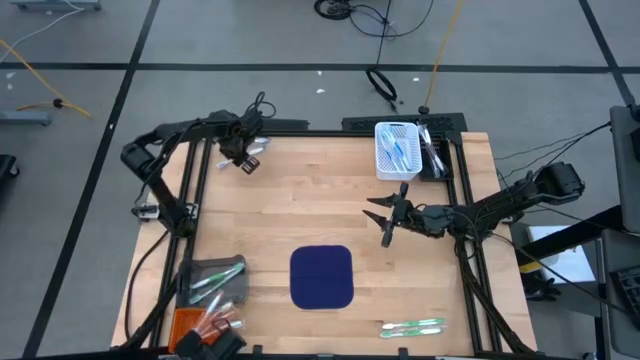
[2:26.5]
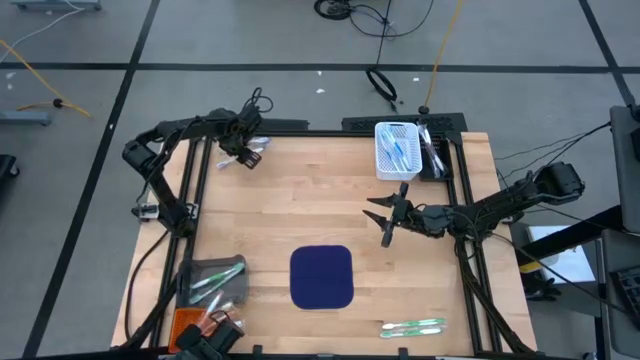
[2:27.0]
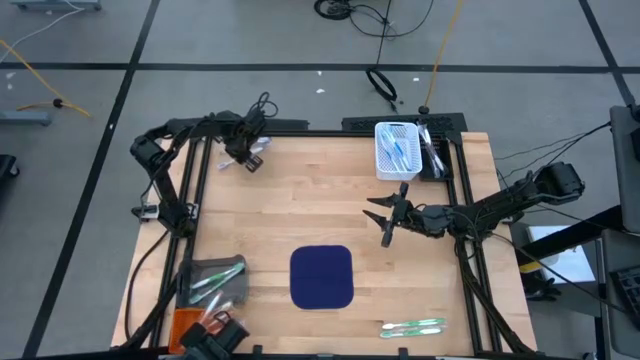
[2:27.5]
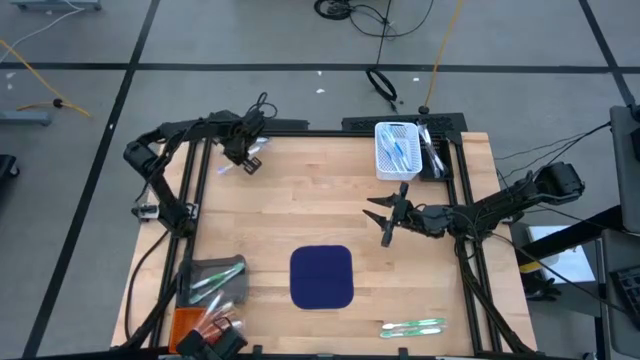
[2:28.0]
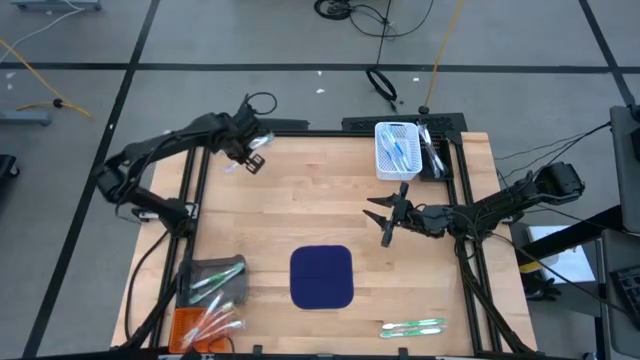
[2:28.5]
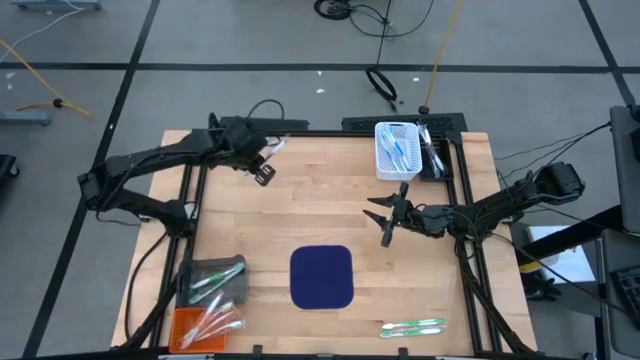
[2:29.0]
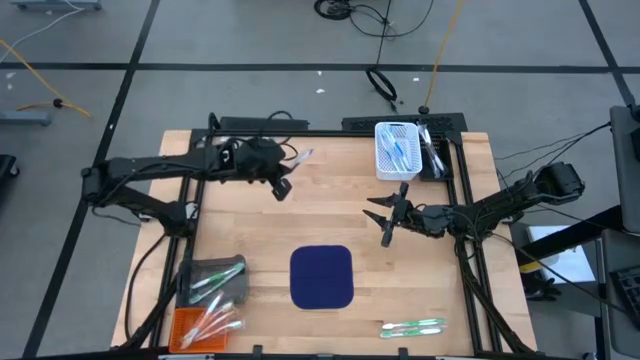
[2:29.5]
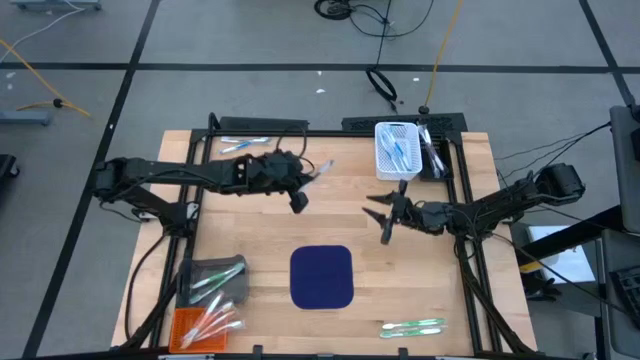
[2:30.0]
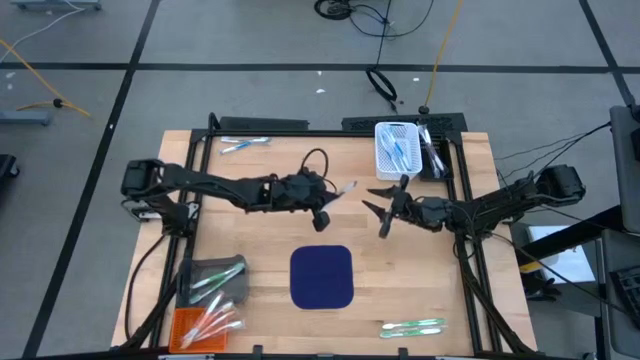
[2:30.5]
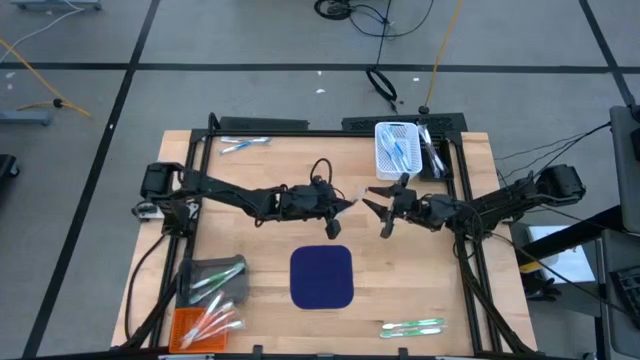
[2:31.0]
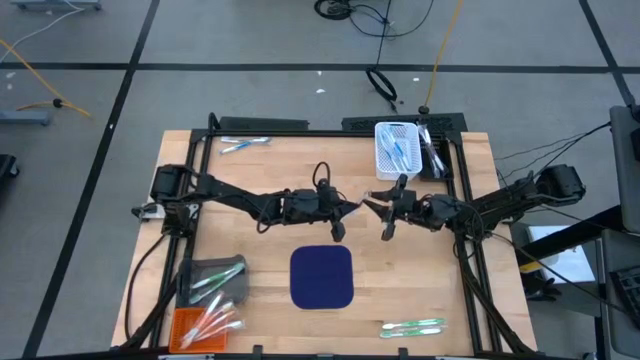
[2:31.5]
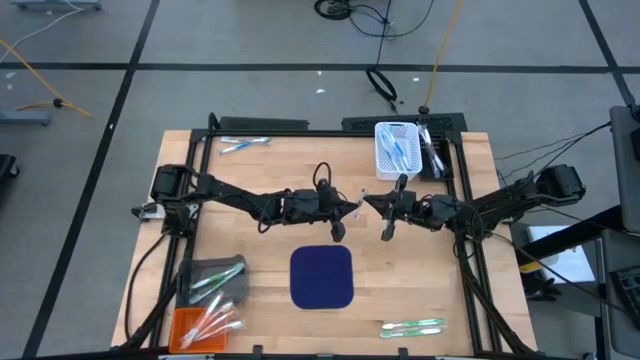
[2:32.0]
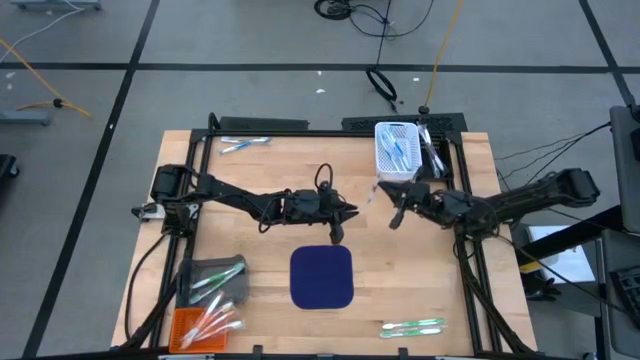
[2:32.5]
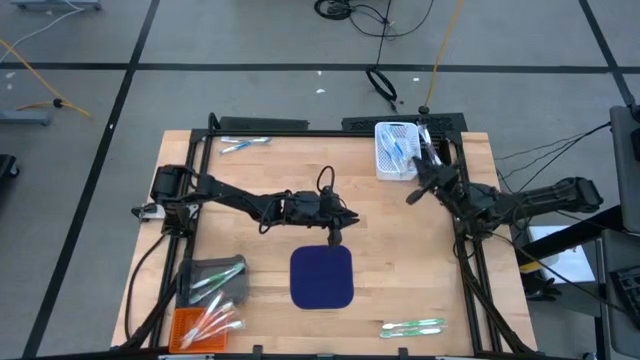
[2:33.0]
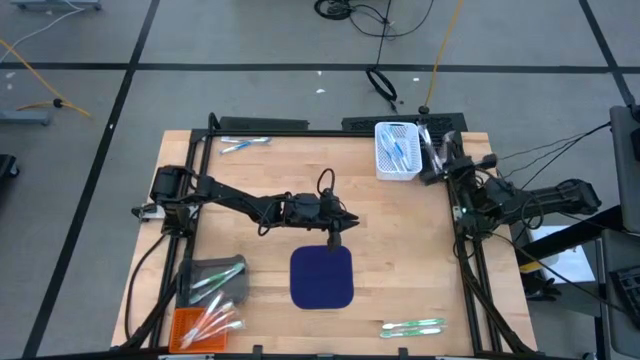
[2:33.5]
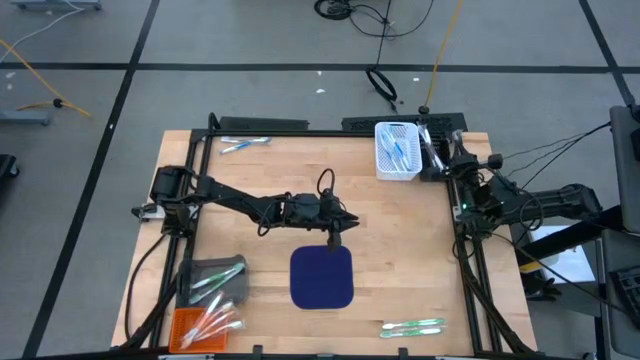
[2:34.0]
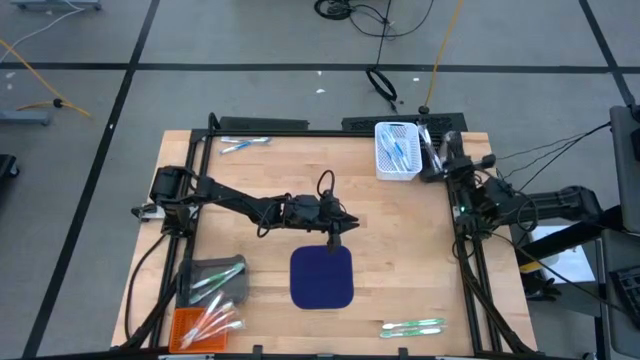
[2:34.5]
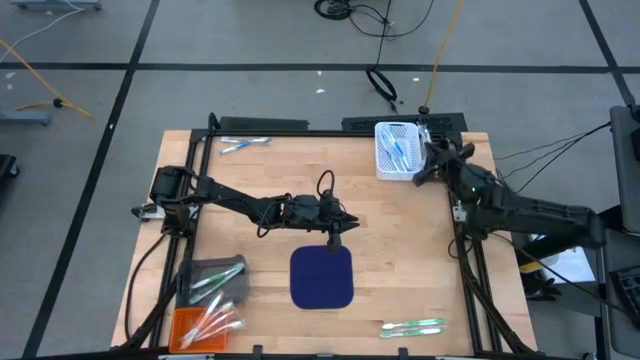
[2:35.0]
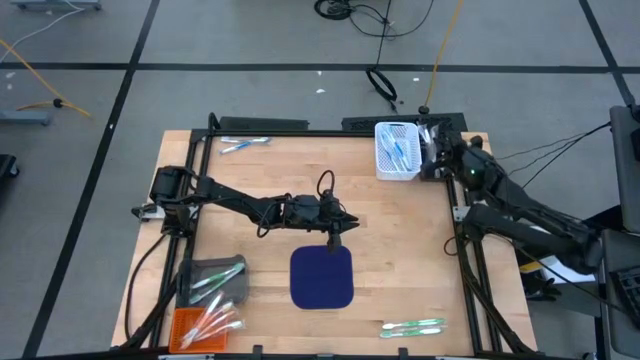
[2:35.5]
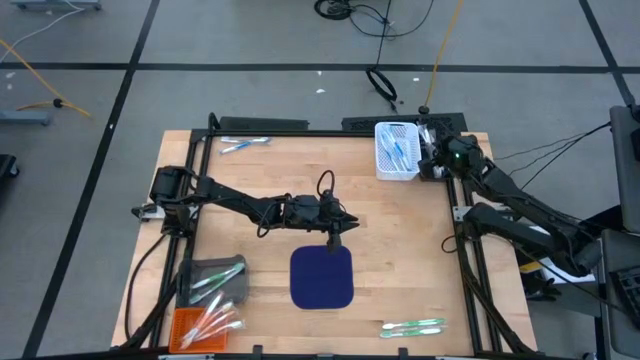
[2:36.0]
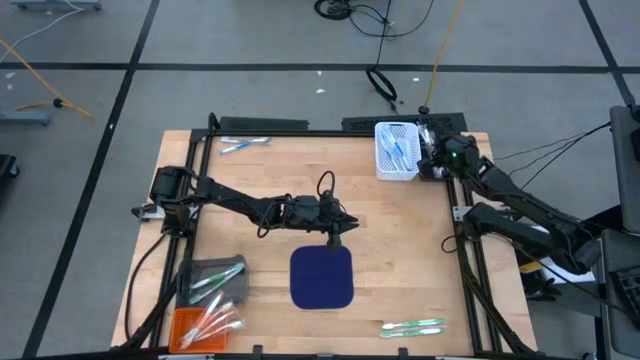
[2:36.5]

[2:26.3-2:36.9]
Task: Pick & Place Toothbrushes
Put the violet toothbrush into the black basket

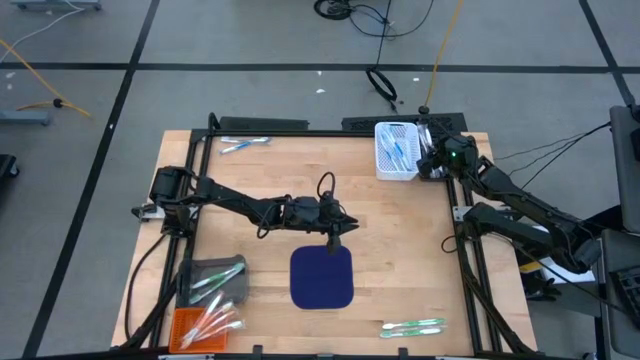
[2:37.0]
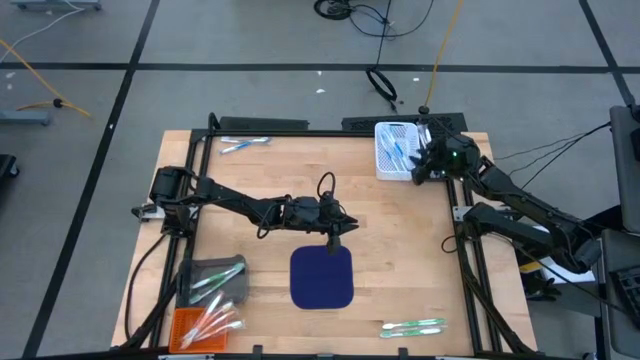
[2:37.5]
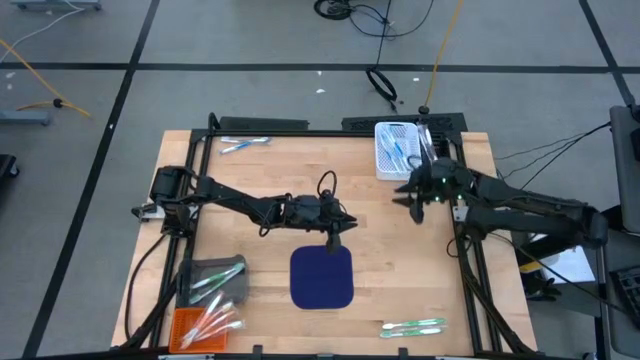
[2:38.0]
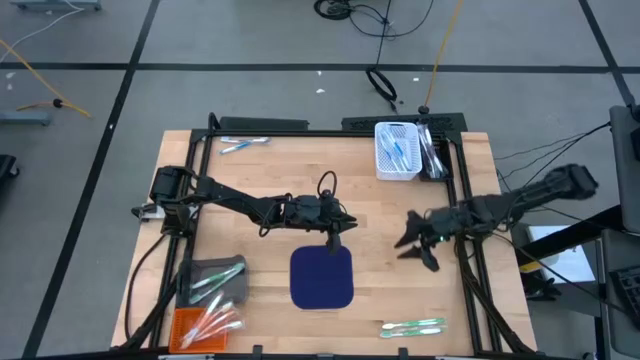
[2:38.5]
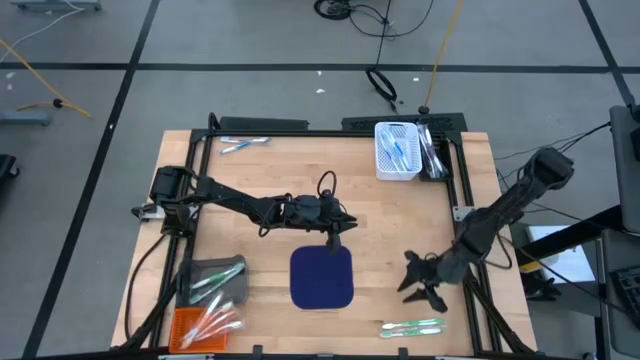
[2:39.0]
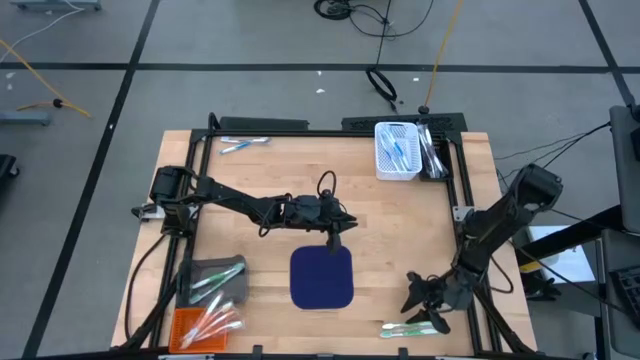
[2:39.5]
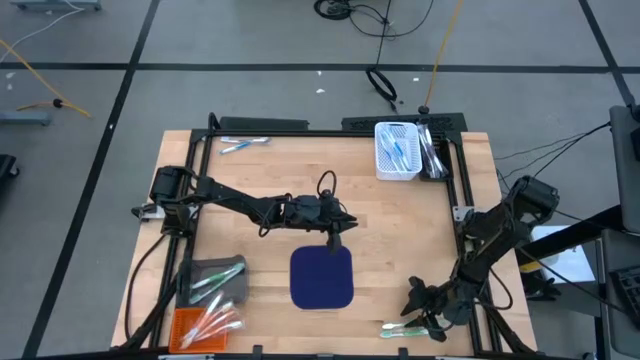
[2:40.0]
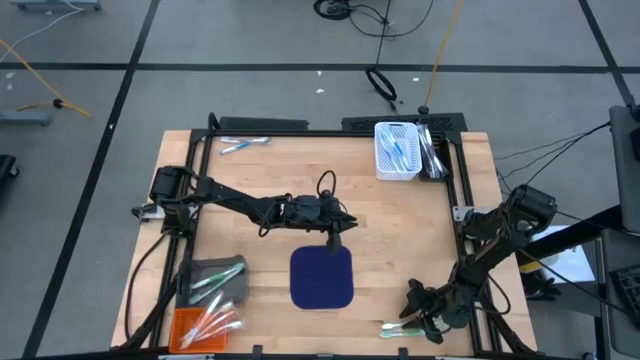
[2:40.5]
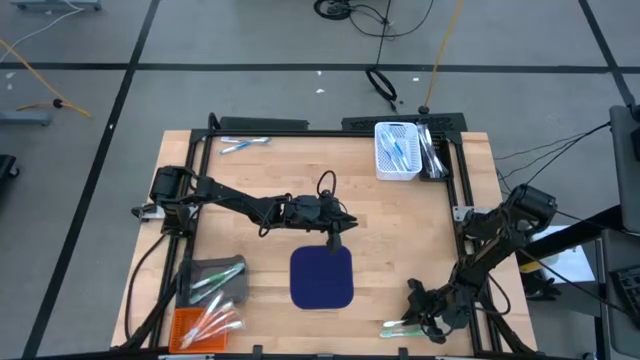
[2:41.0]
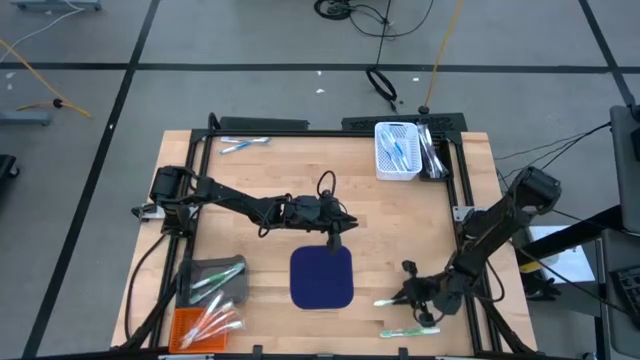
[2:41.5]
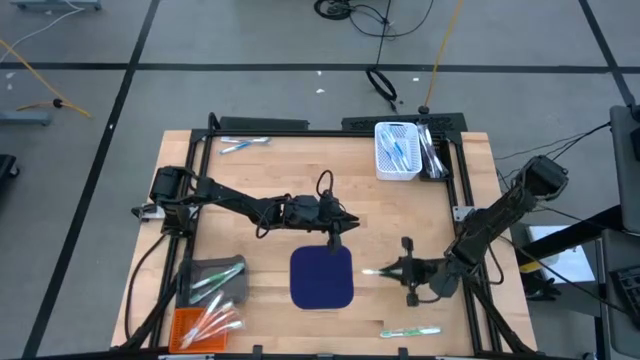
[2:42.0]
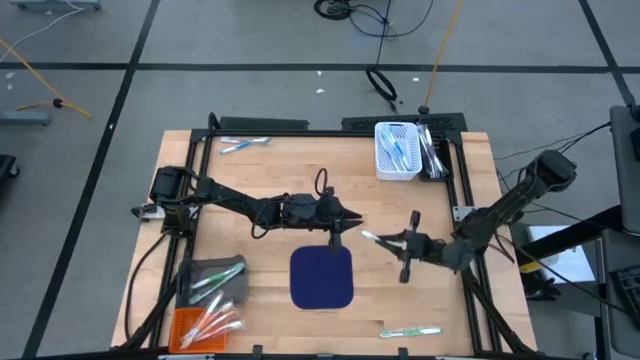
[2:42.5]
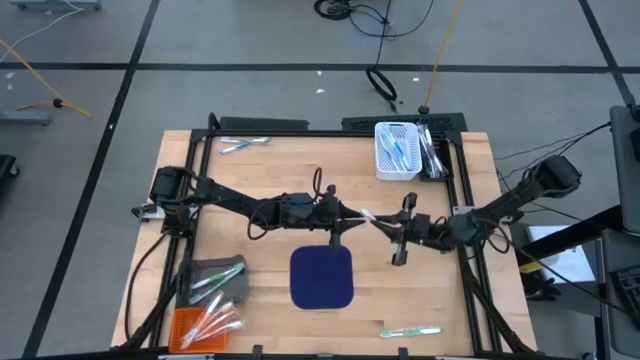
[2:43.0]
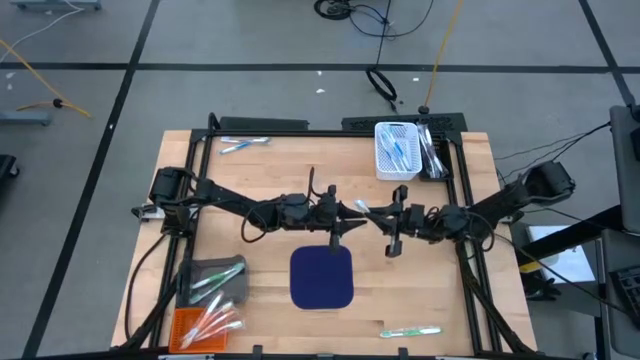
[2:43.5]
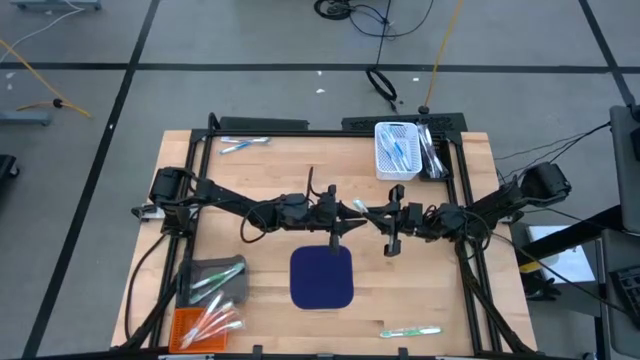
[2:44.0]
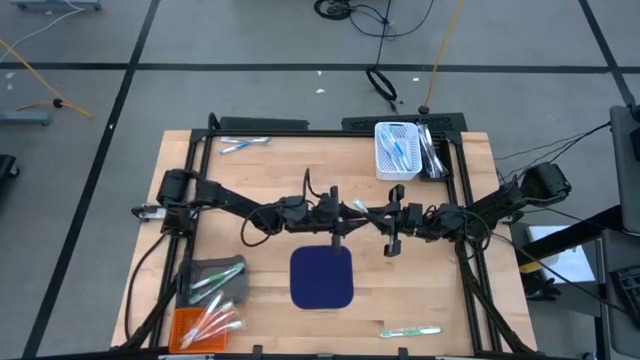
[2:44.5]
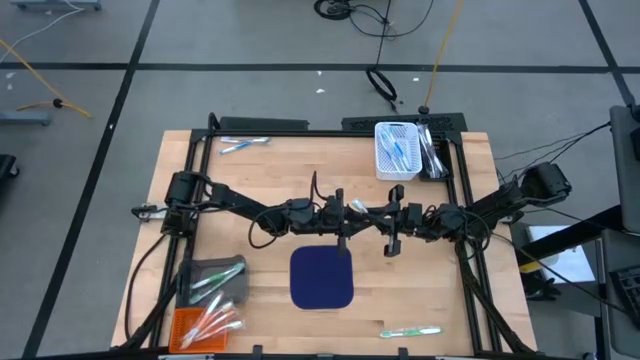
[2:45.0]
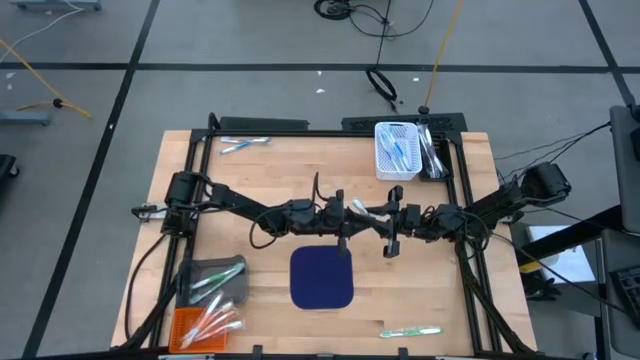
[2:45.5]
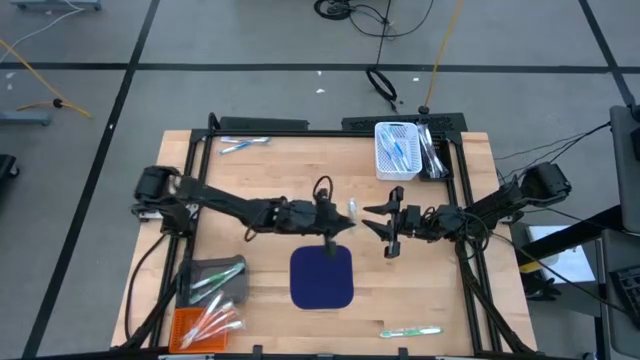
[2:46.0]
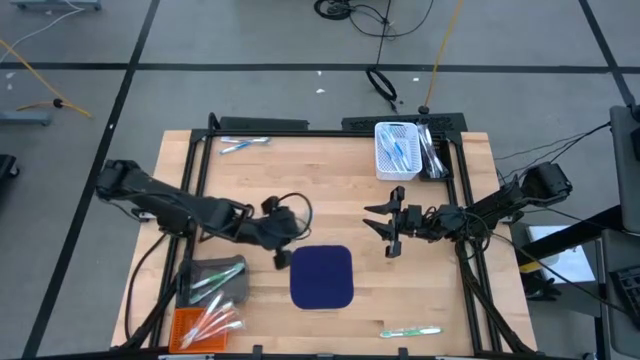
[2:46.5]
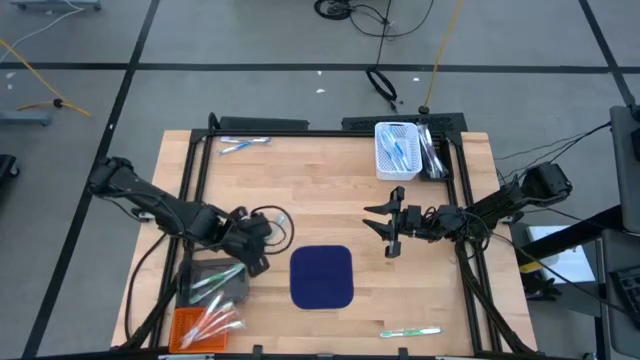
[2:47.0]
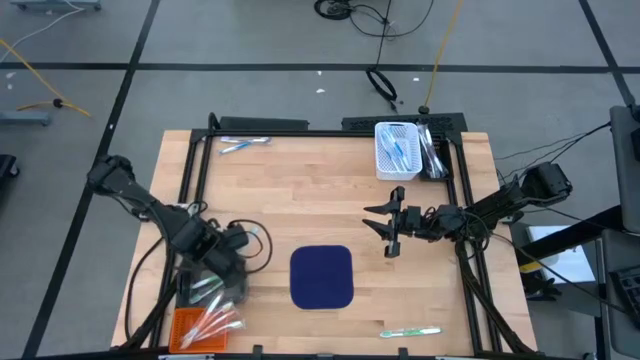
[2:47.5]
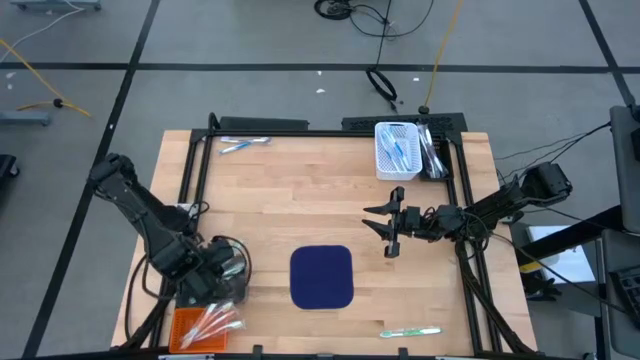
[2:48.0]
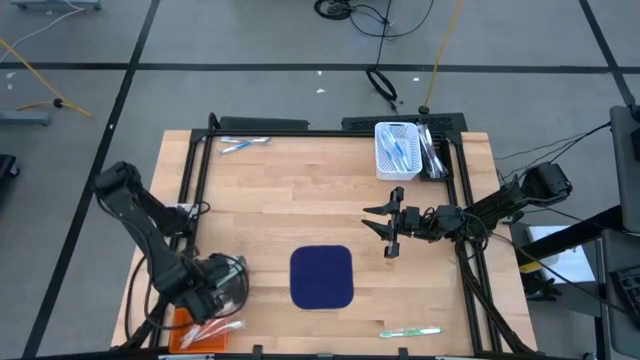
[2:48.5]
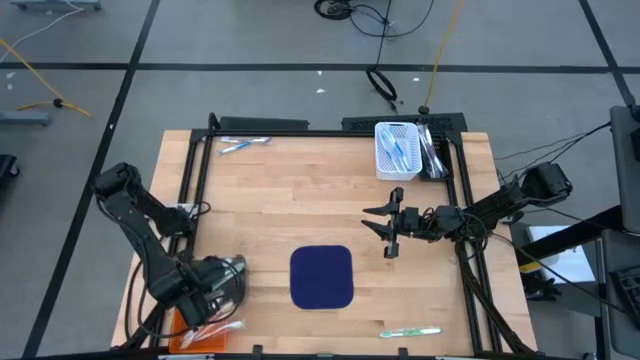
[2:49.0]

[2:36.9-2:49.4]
Put the green toothbrush into the black bin
